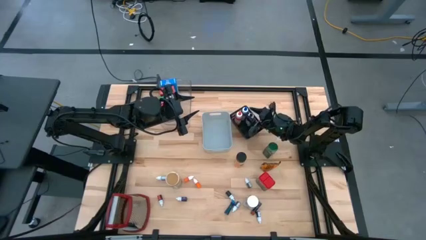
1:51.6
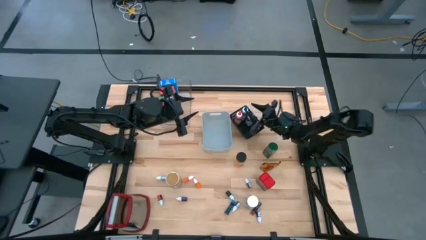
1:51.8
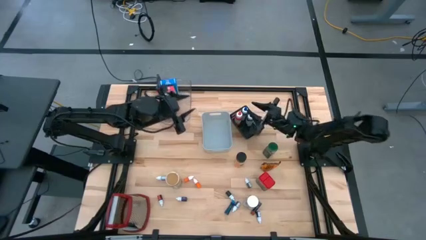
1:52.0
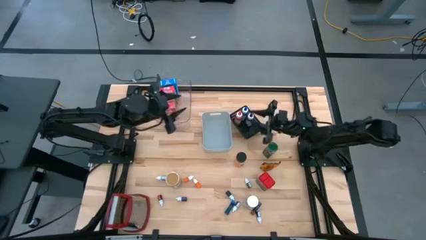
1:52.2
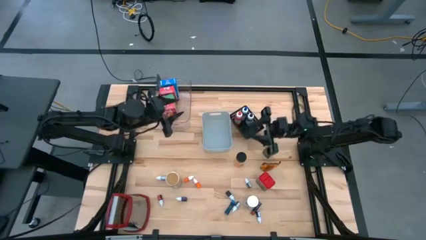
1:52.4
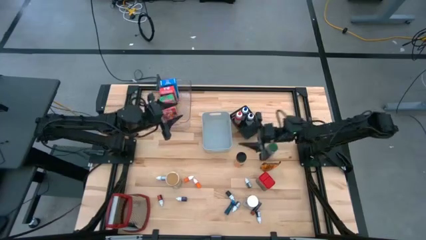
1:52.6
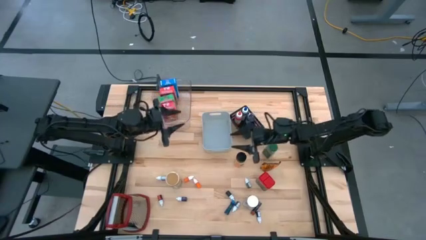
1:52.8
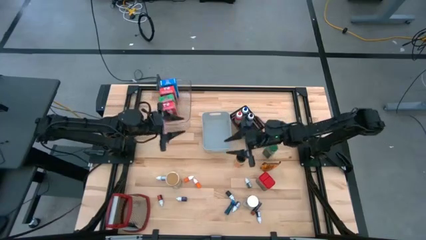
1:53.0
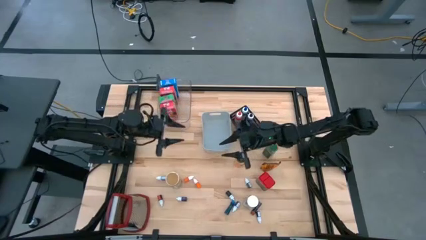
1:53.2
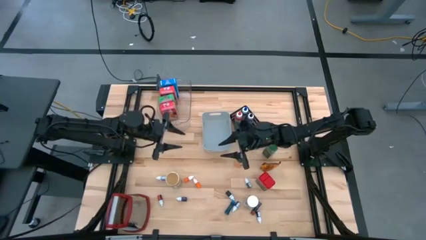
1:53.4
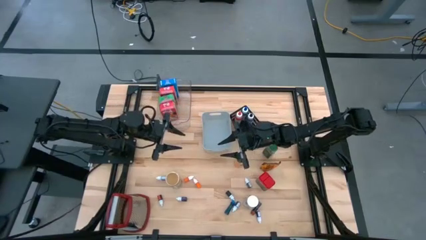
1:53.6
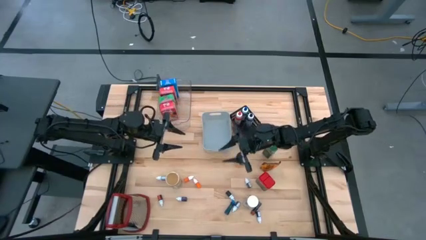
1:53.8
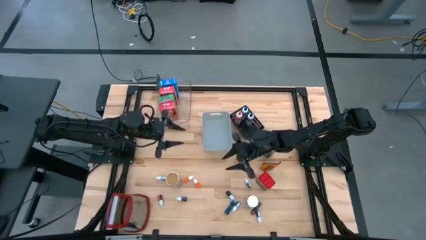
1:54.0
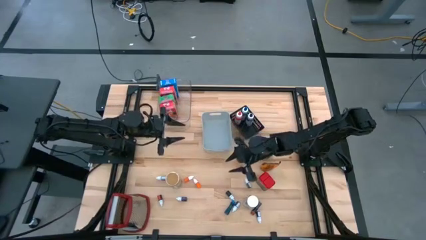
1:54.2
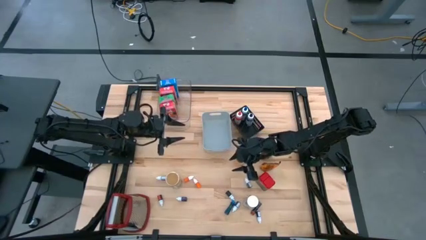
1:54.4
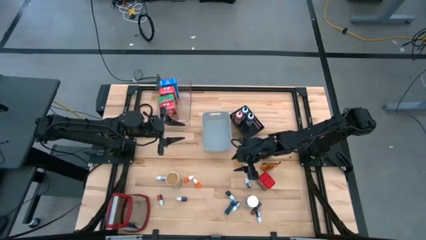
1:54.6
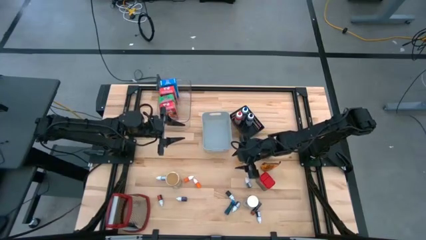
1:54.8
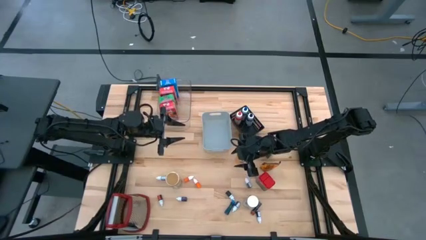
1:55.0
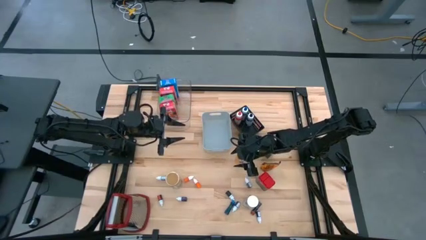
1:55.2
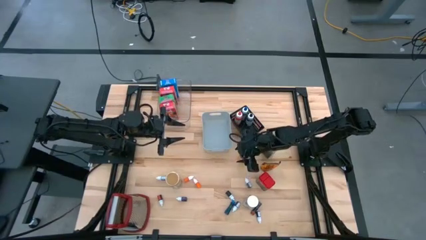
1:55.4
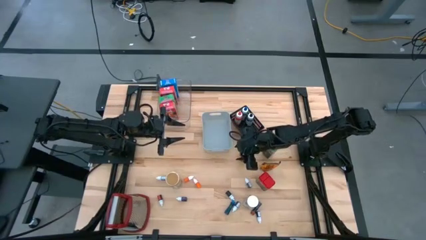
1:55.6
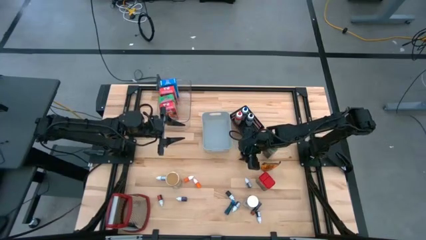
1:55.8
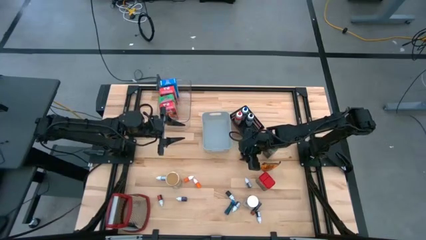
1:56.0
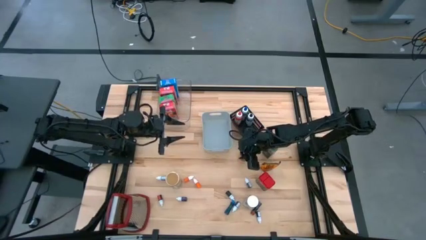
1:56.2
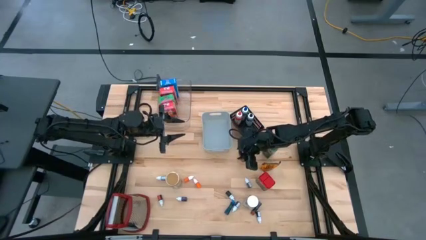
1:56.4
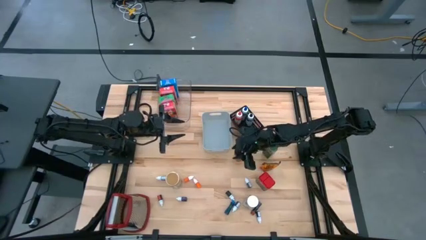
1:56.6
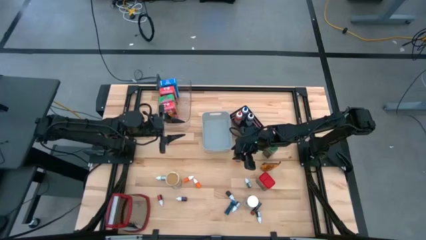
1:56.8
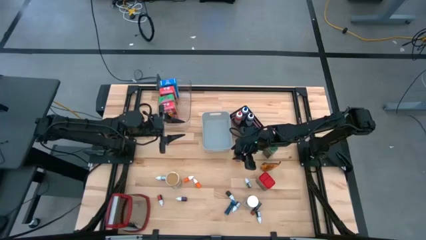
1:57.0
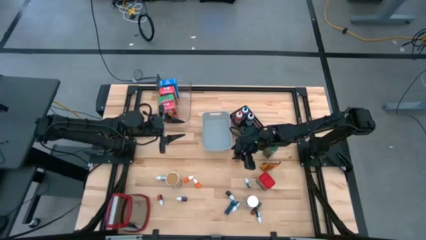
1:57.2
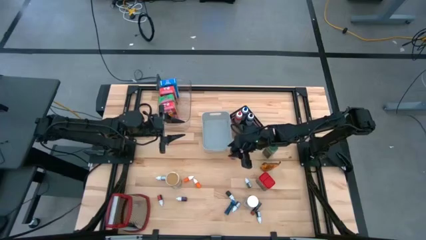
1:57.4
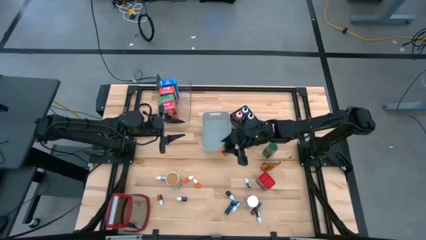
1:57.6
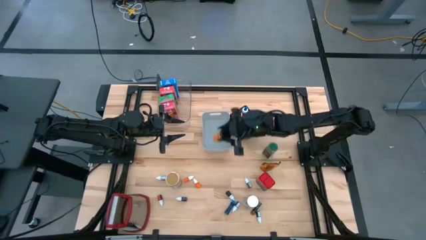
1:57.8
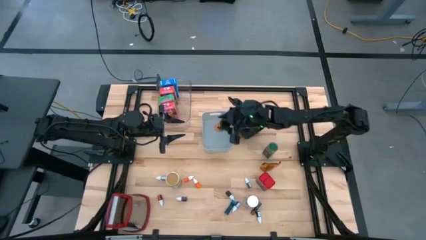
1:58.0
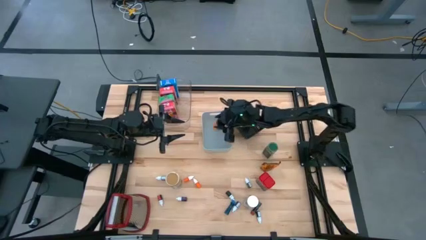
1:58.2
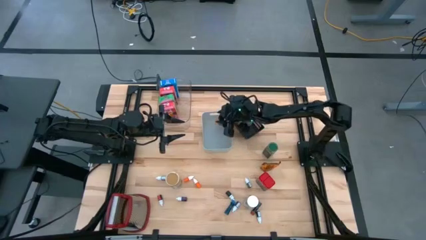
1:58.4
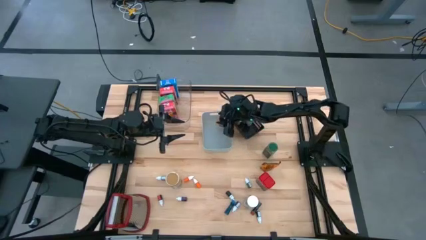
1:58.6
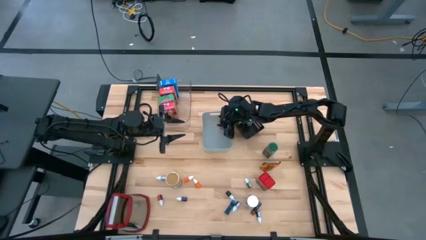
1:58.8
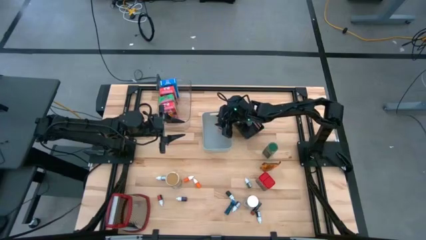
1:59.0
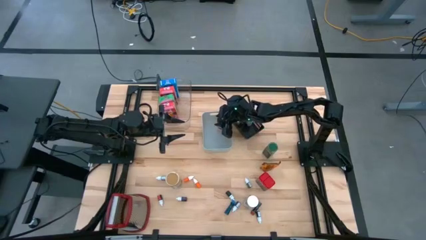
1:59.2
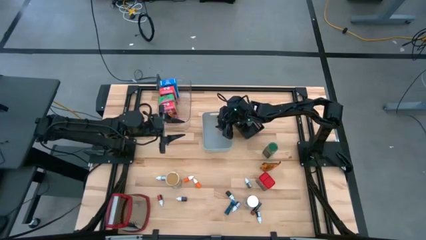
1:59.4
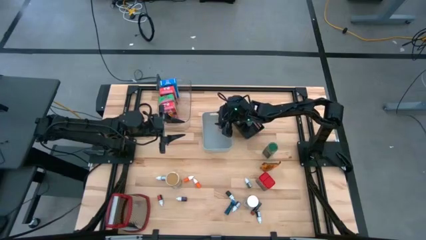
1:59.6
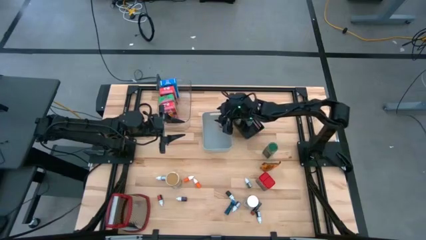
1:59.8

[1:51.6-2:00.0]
Task: Pick & Place Kitchen Items
Put the orange seasoning bottle into the gray bin

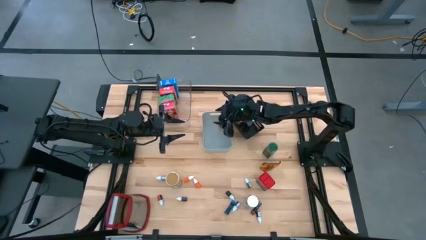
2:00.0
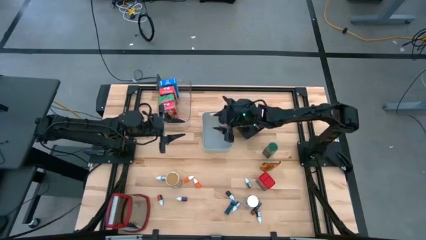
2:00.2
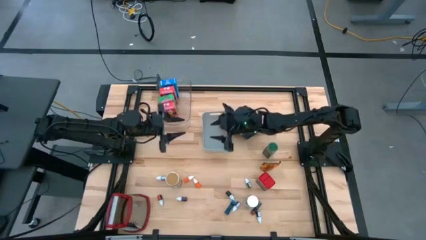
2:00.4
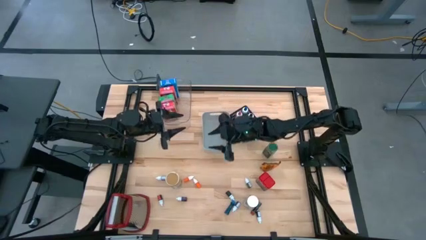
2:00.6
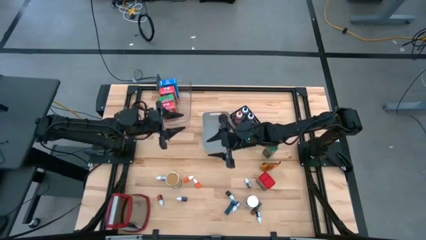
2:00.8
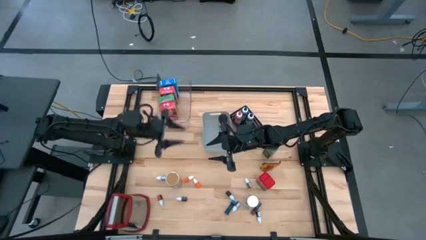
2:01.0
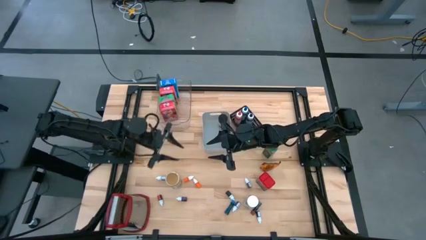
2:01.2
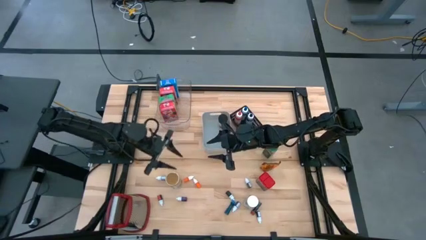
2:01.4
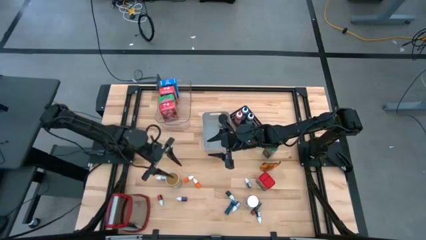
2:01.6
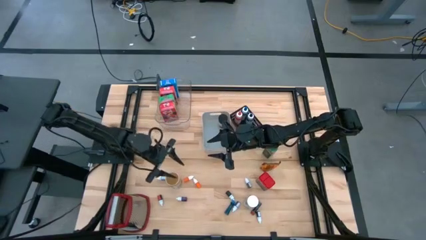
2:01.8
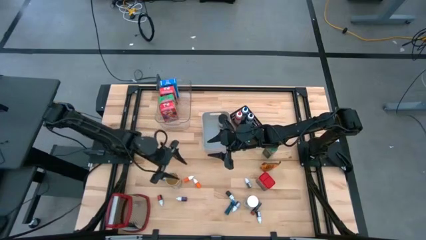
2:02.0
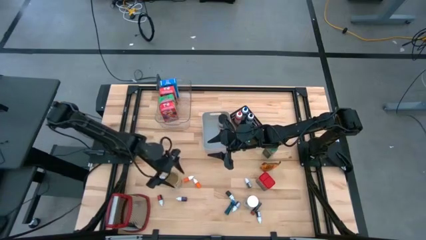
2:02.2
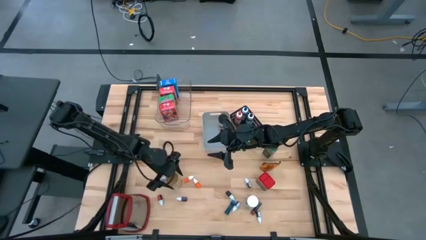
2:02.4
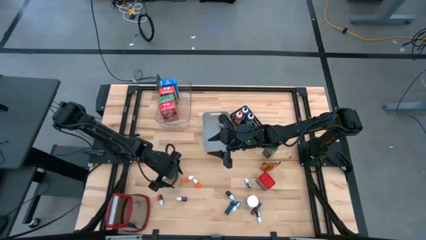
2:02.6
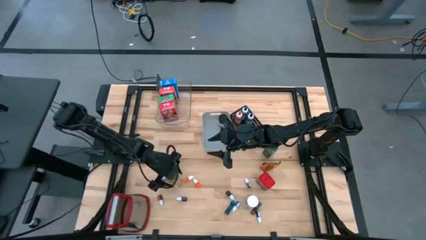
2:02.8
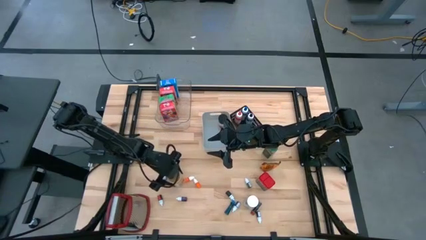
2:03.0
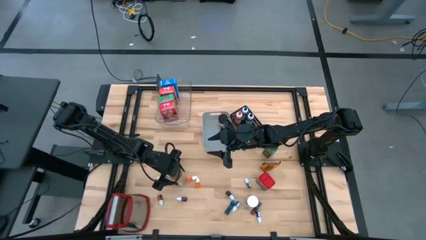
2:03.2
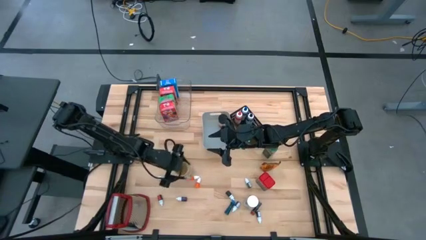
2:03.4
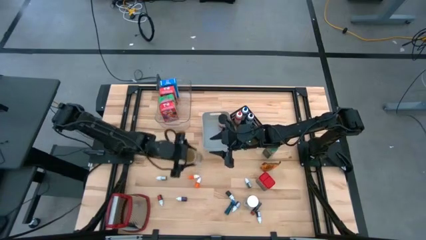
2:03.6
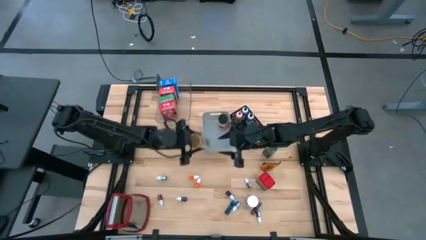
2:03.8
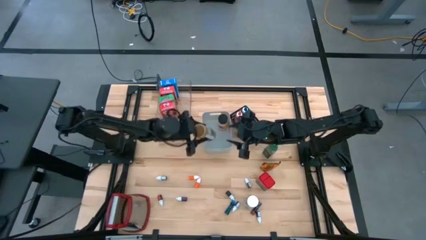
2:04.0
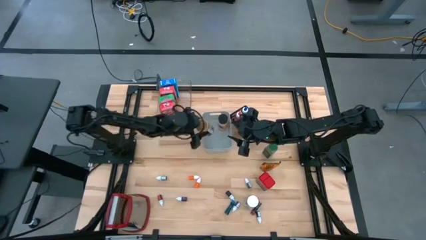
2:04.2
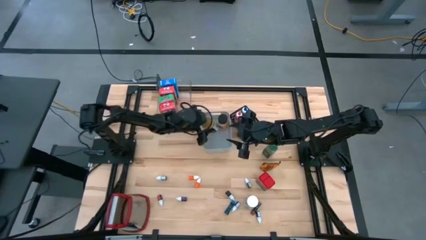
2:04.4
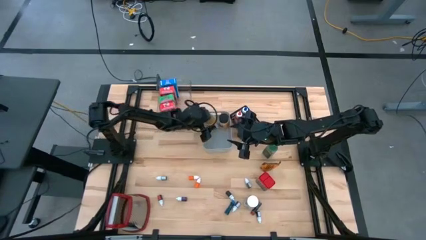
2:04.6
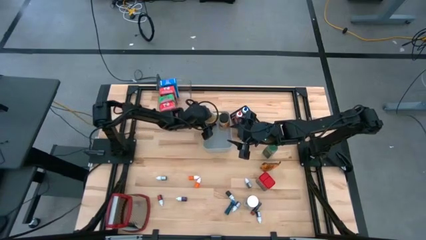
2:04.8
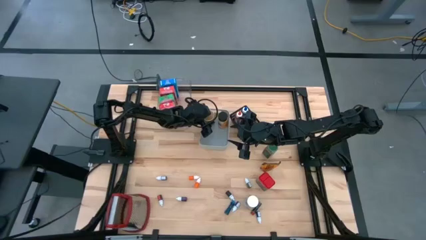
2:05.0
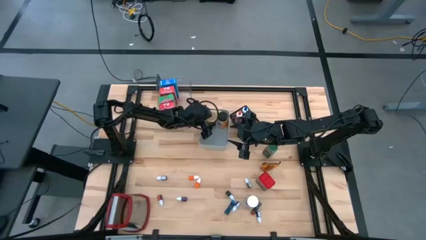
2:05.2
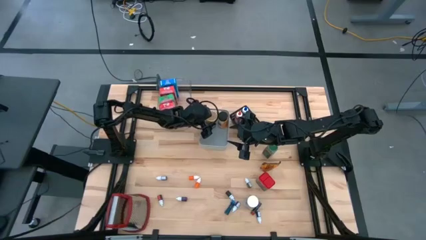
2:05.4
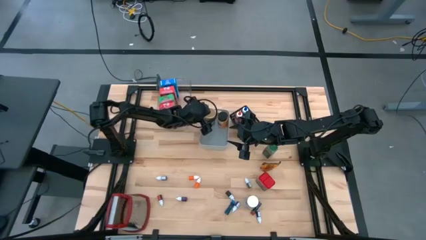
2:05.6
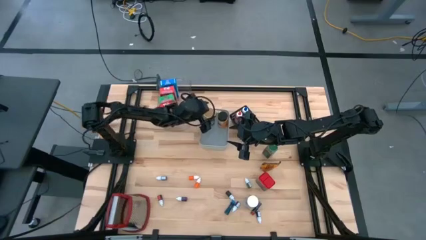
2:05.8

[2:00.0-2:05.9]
Put the gold seasoning bottle into the gray bin

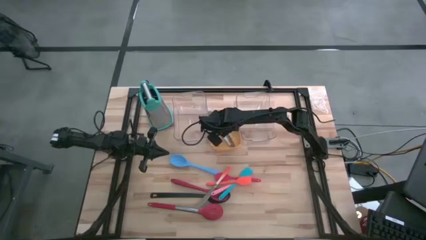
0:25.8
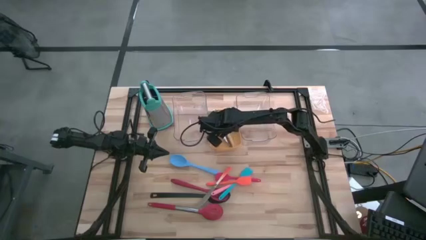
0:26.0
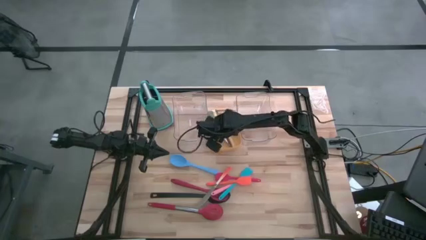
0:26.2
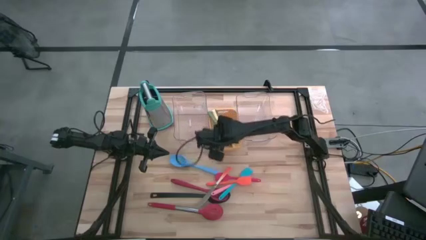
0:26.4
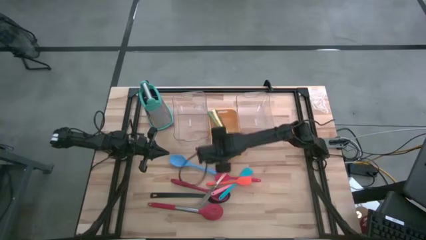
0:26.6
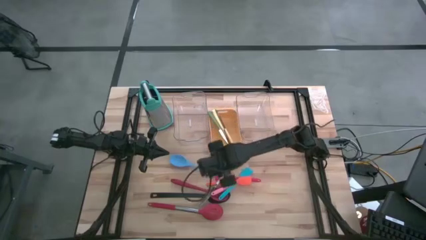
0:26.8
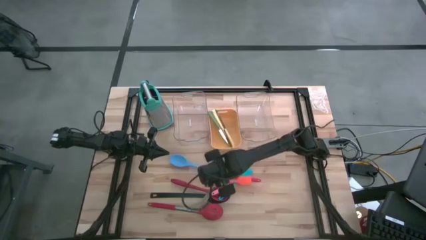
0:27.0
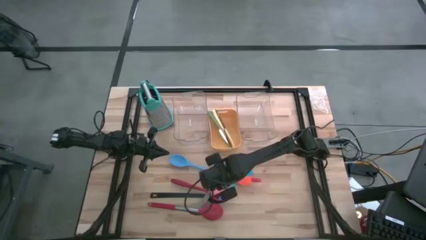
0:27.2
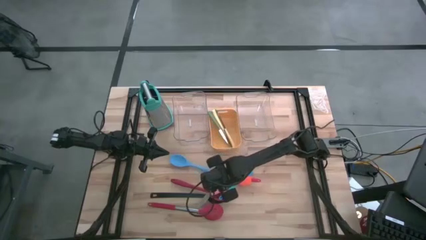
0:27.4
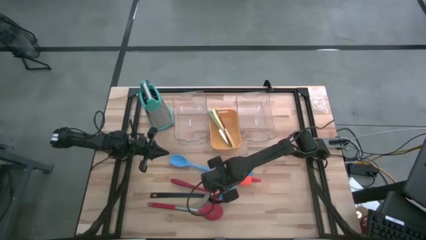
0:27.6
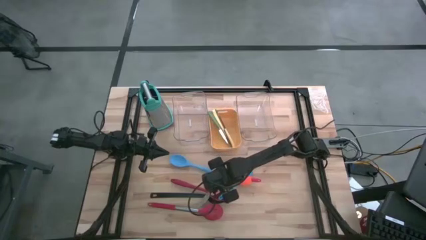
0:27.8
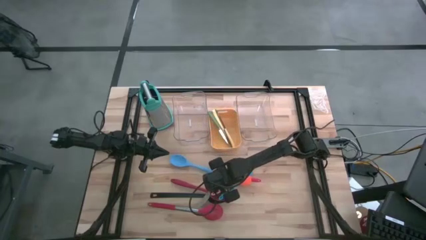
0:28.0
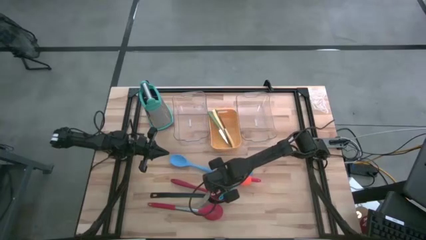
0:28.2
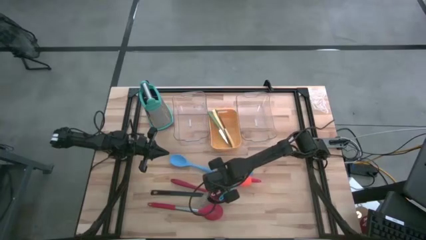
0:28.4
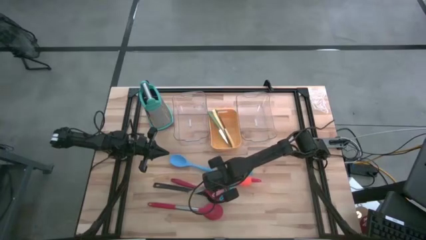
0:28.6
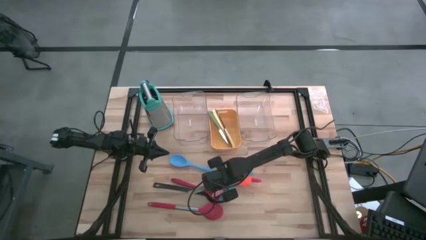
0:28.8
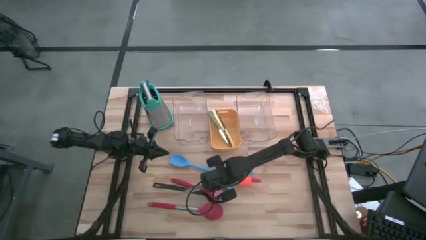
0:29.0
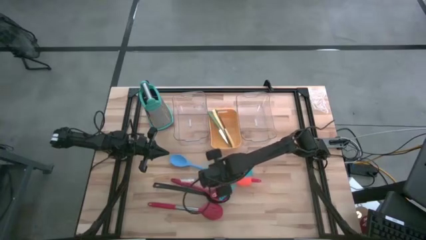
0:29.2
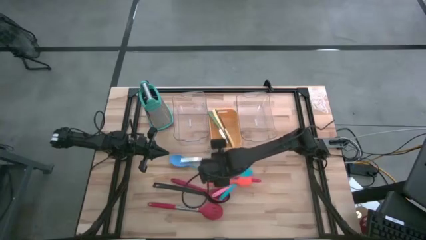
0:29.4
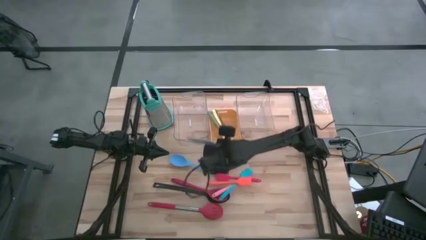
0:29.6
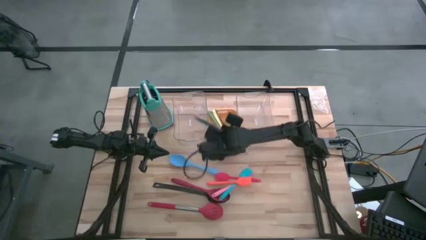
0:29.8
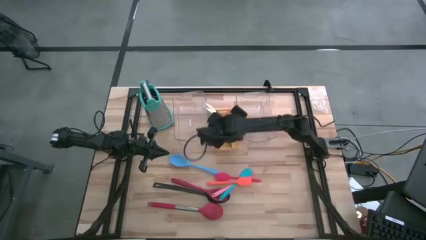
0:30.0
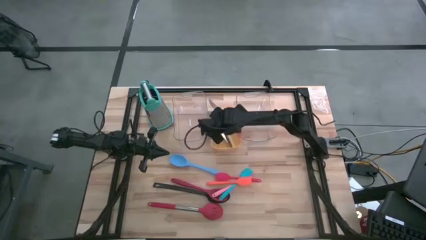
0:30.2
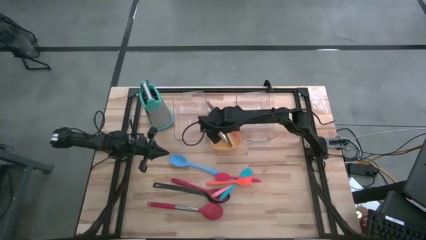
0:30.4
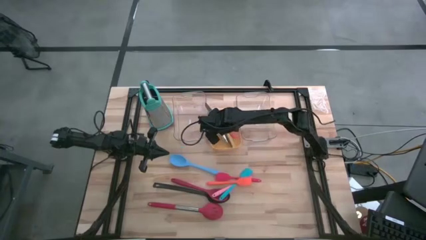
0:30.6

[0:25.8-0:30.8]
Task: Pick & Place Kitchen Items
Put the orange table knife into the orange bin
